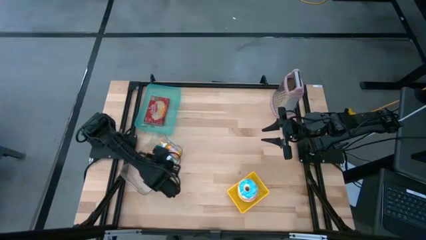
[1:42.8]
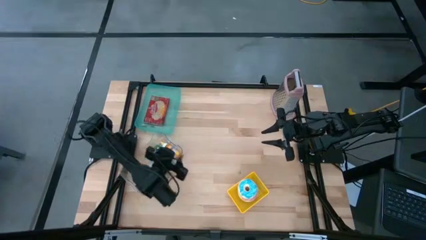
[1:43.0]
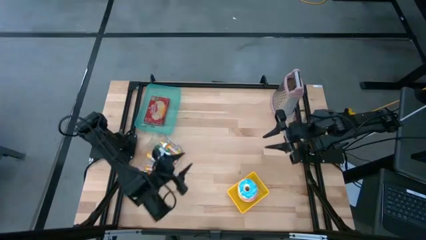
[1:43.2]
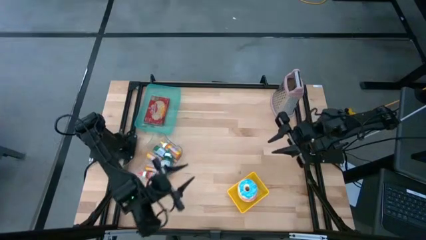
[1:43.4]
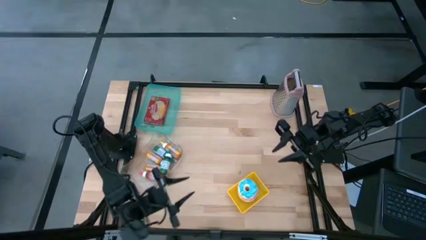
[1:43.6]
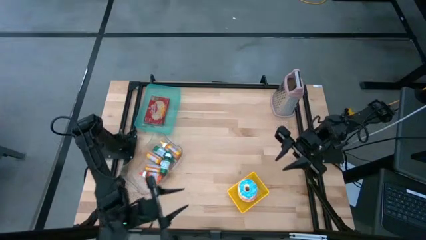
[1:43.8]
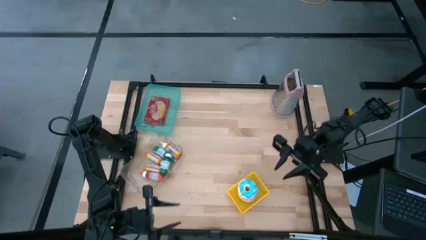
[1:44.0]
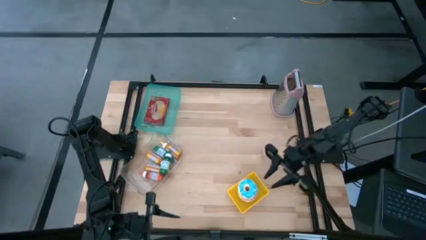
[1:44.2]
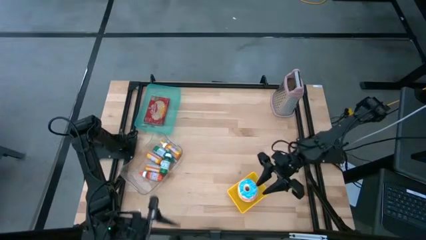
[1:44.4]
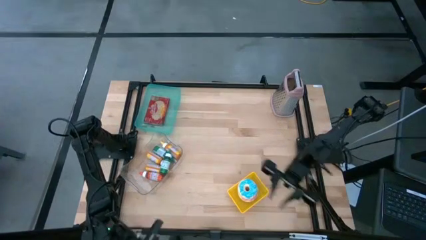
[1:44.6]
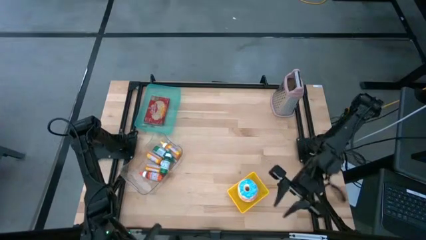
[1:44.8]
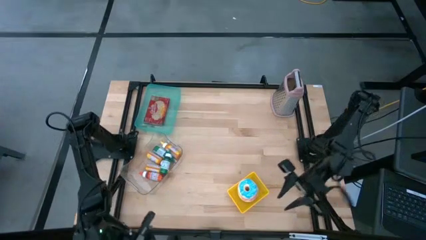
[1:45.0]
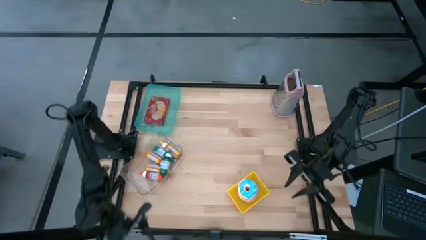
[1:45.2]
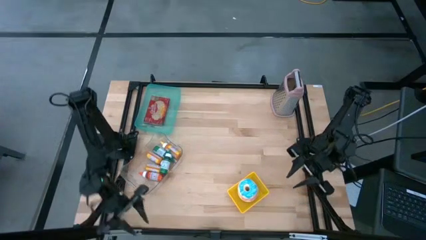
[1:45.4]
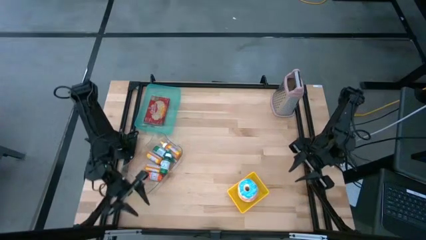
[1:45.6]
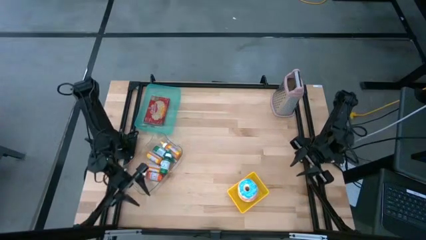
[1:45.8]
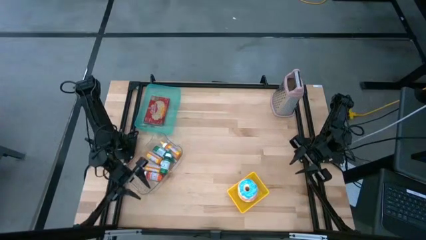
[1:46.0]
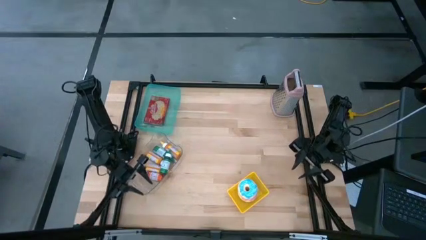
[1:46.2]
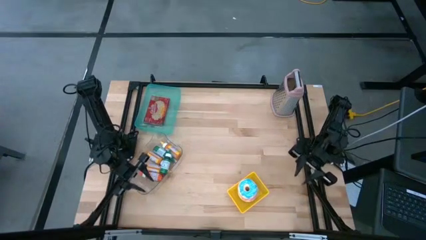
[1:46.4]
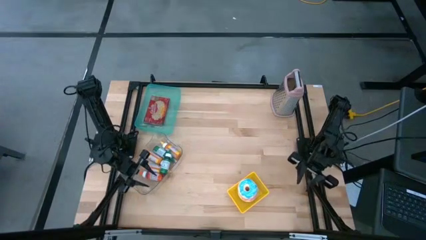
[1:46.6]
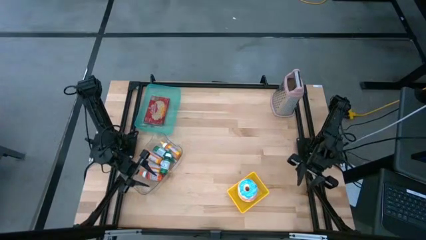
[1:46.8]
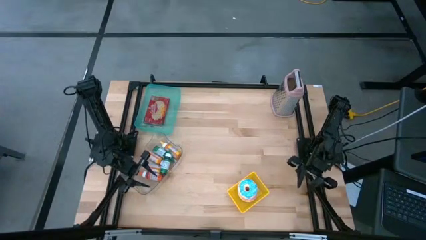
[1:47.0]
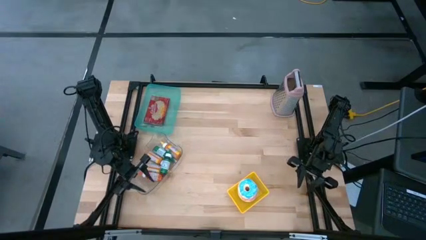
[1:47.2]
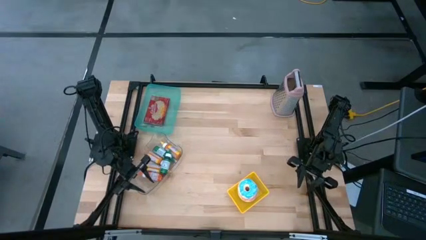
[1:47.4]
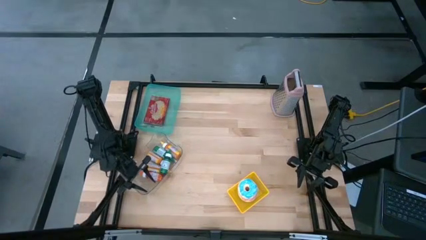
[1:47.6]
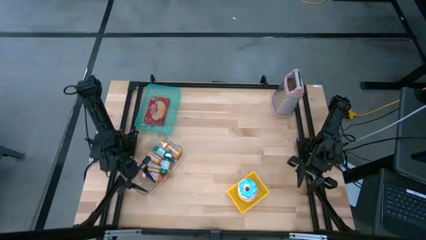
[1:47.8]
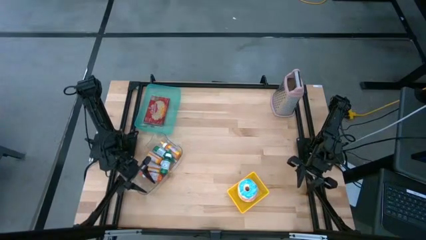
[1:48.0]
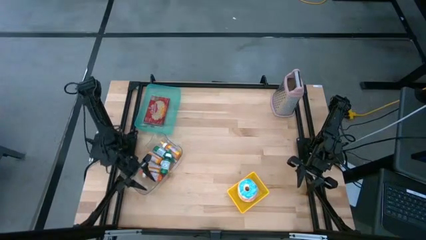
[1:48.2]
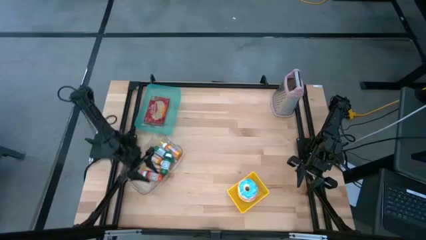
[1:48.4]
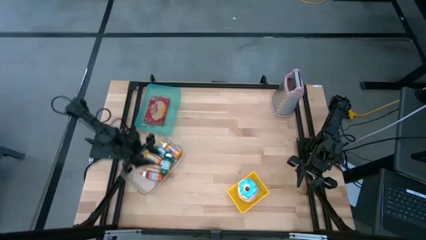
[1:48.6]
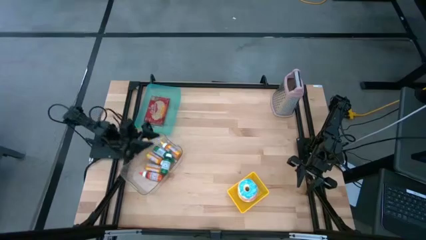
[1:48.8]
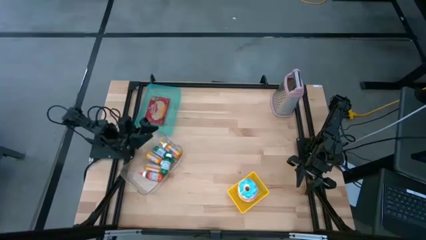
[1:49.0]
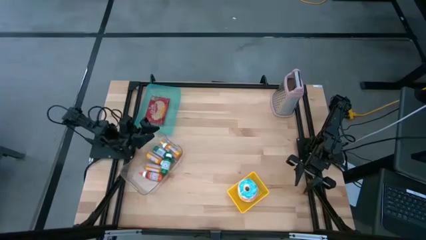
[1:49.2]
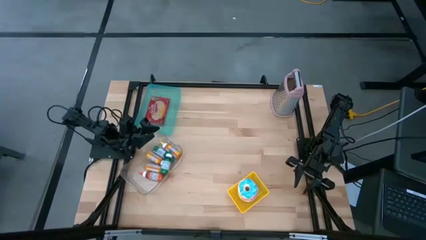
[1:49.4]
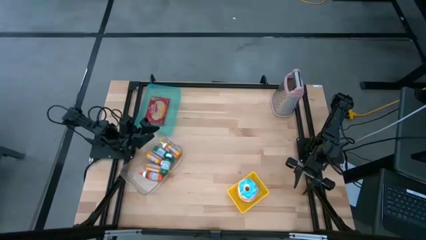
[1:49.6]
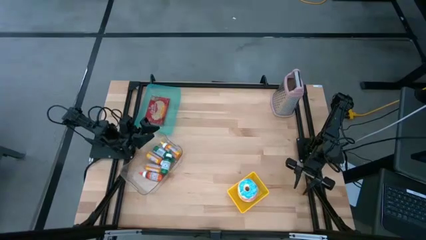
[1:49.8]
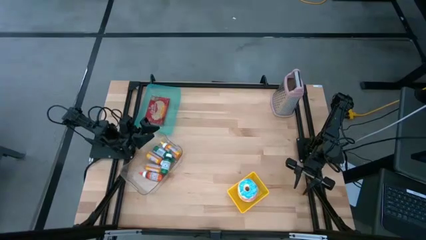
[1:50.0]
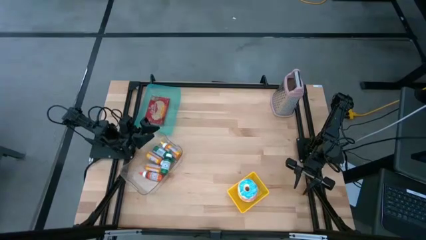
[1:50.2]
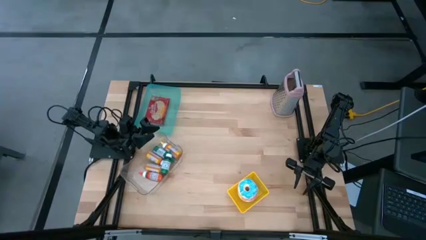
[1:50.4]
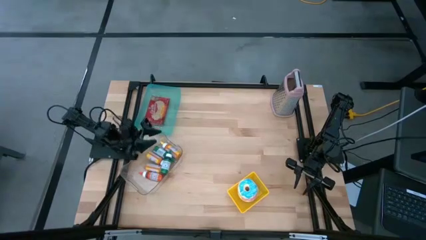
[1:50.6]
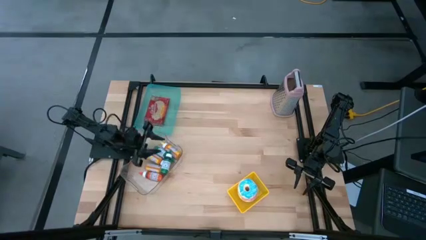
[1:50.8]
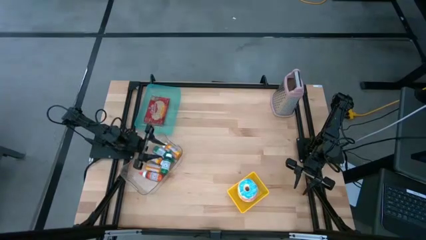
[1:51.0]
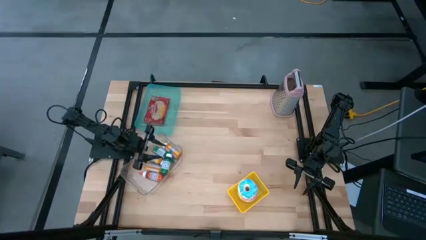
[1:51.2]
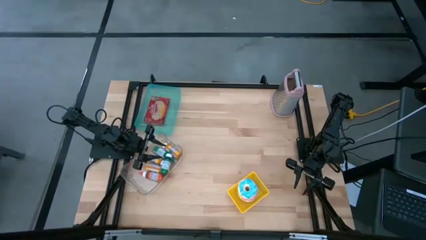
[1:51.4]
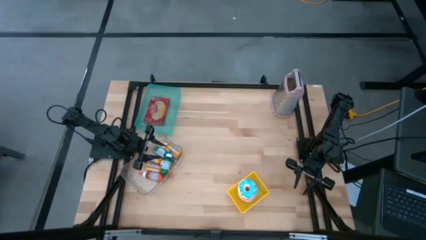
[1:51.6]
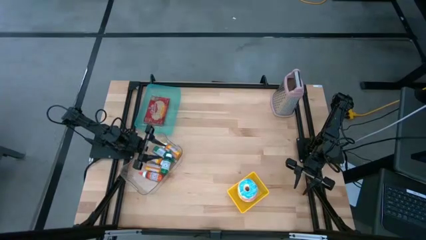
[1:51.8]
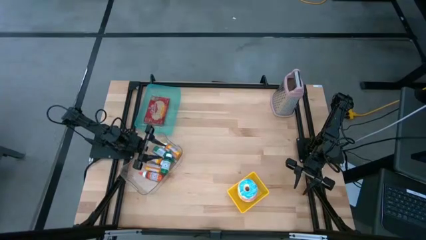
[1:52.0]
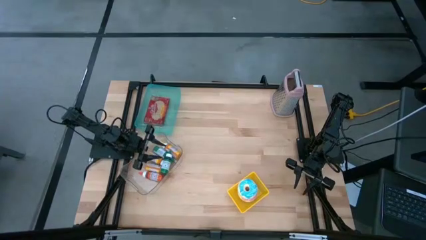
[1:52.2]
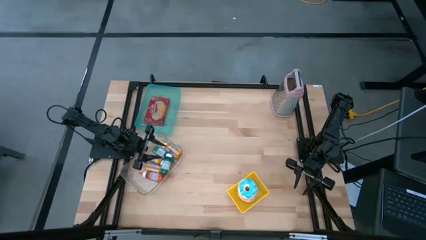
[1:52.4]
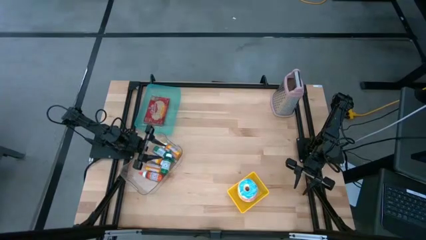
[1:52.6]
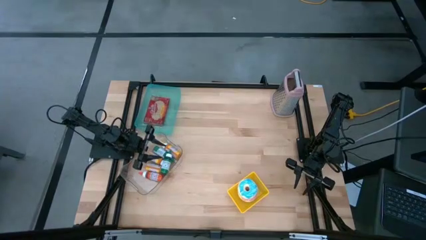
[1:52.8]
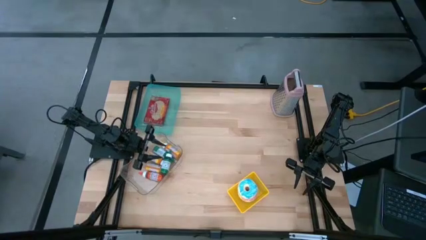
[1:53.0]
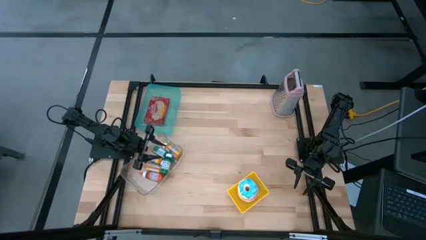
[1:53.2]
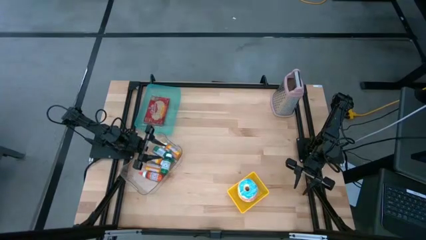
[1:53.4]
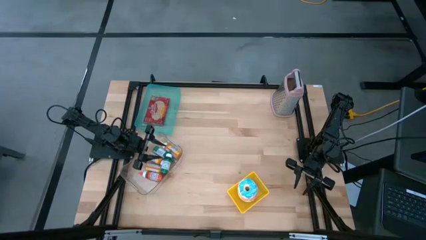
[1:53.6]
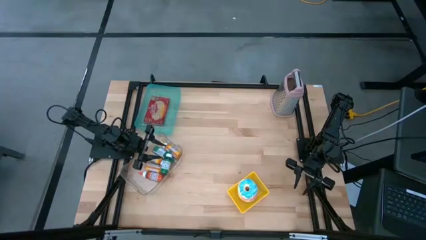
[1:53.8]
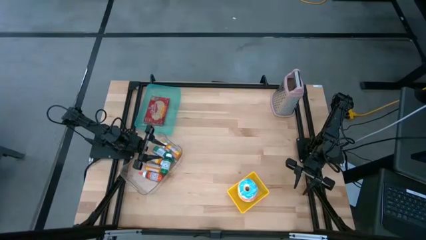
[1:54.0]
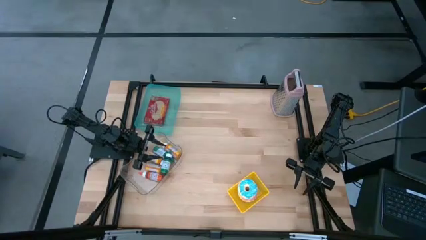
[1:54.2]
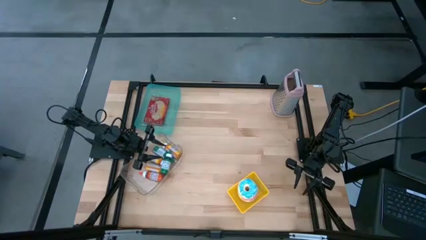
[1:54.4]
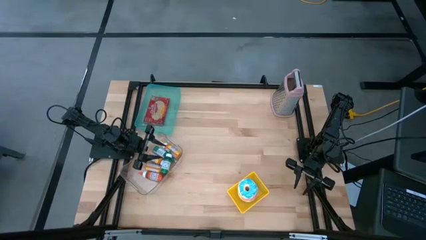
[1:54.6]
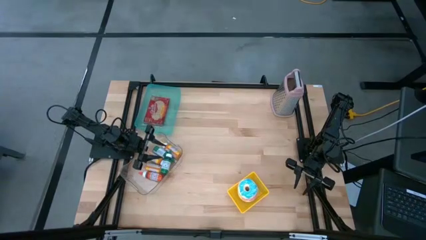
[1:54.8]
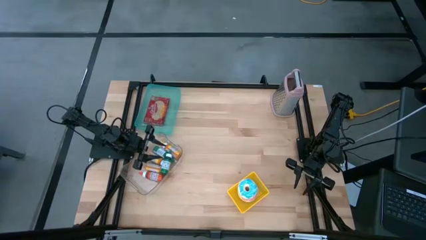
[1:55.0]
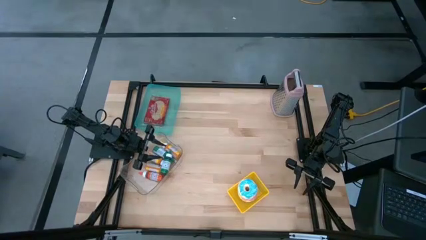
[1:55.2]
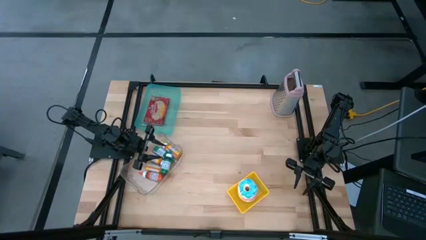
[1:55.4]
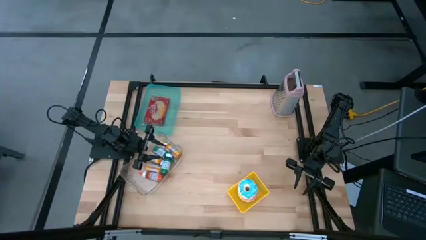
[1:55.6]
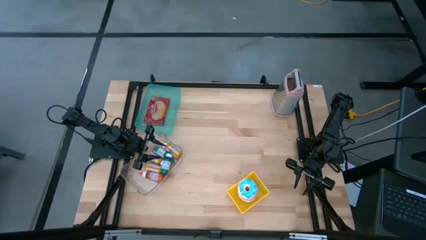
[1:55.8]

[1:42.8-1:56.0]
Return to Home Position

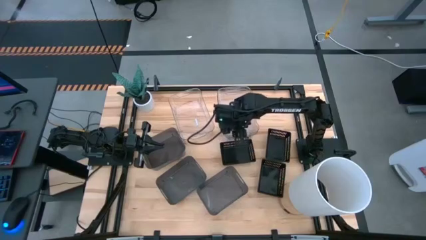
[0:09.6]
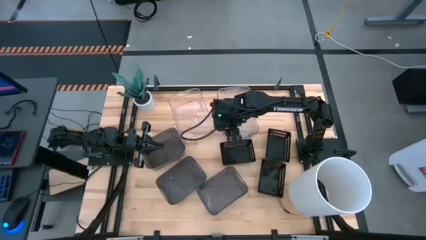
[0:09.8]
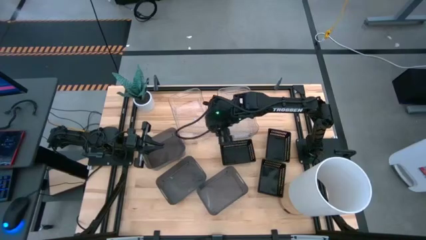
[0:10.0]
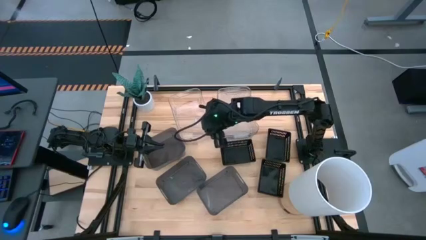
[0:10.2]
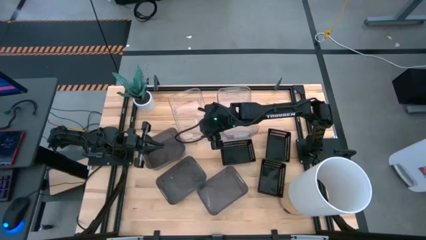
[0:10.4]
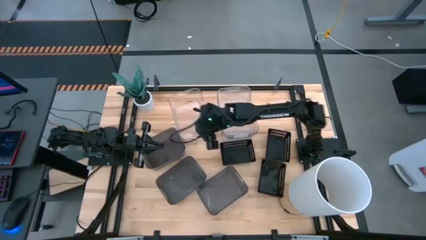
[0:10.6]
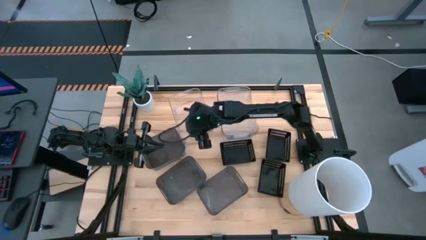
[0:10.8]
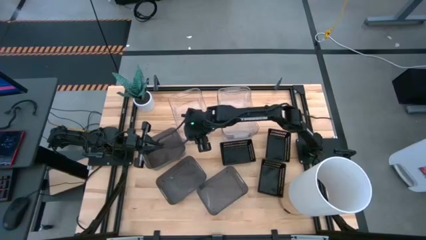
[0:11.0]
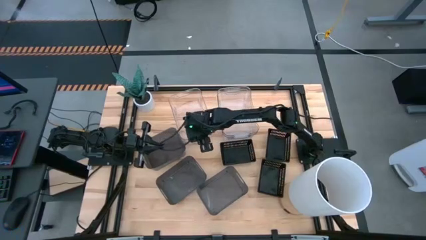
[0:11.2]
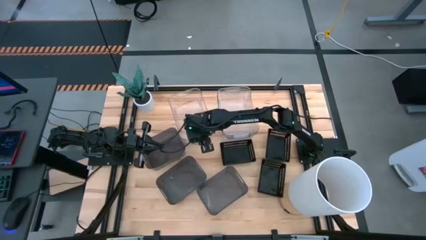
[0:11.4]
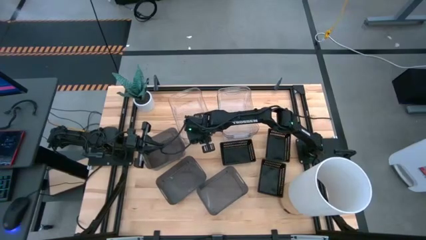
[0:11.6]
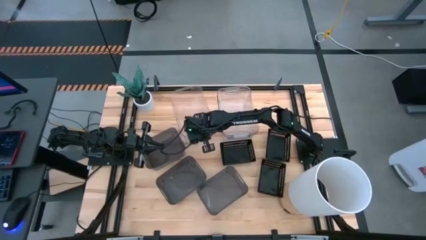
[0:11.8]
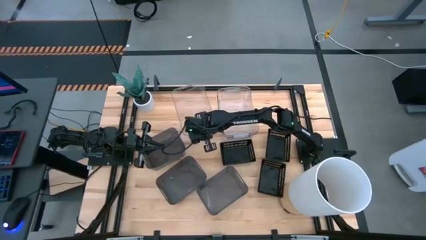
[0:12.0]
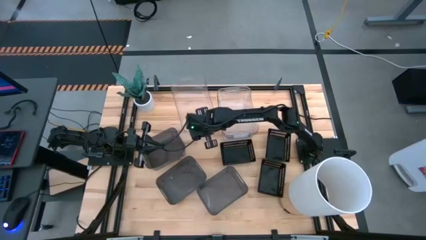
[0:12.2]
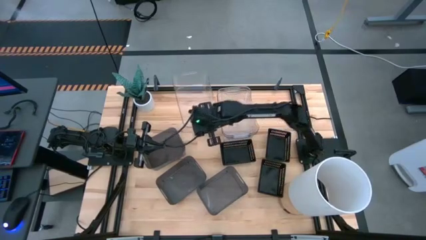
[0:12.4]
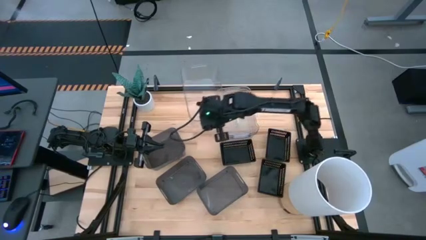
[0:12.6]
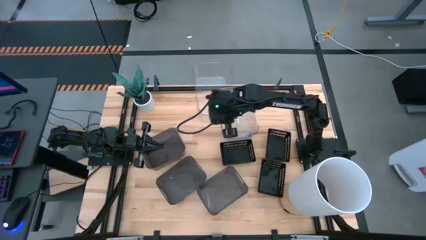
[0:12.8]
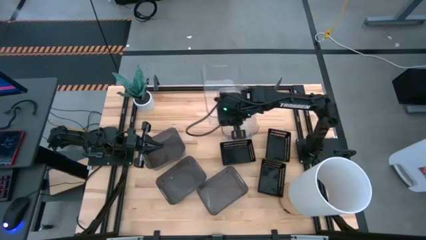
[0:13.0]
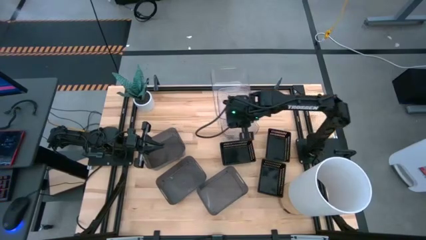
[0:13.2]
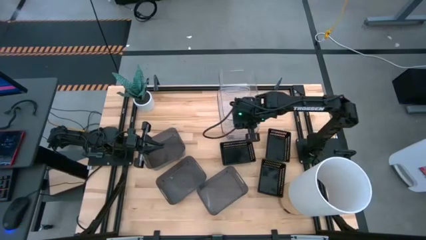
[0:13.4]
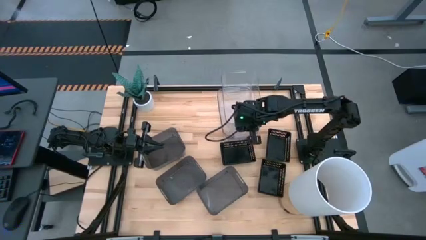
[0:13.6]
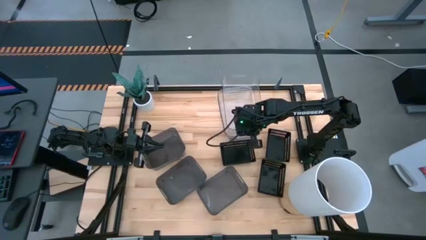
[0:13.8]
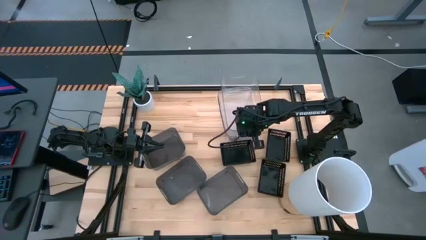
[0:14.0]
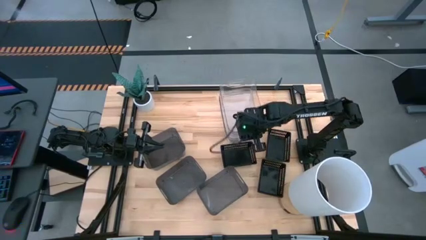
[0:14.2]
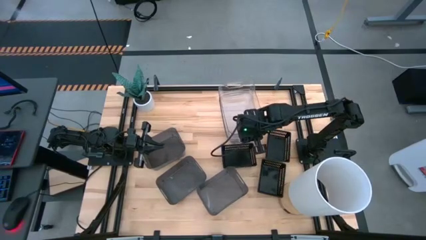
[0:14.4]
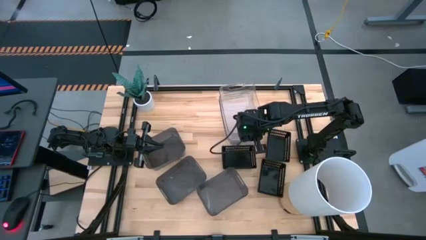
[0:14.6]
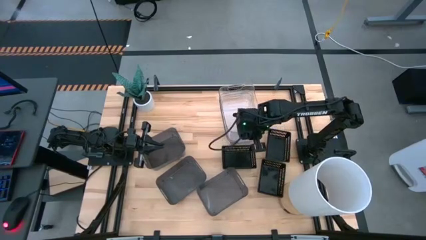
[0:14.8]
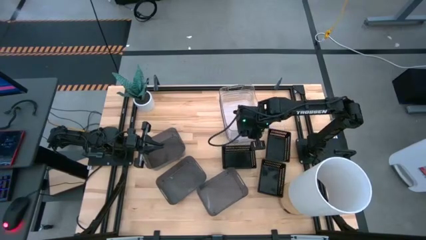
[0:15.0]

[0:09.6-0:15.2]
Stack the right transparent bin on the top of the left transparent bin
